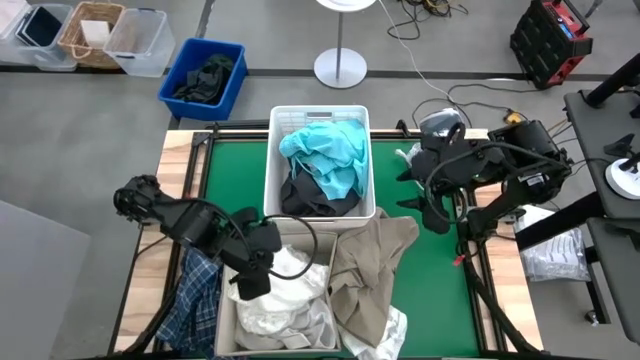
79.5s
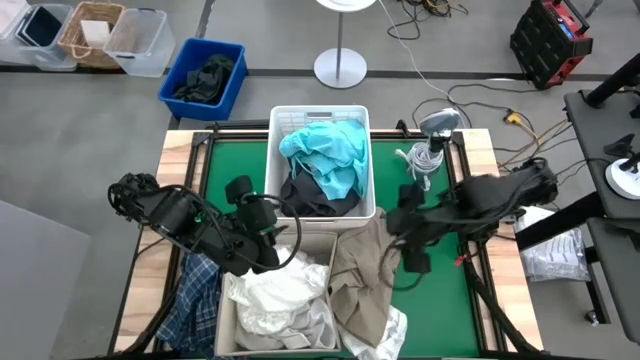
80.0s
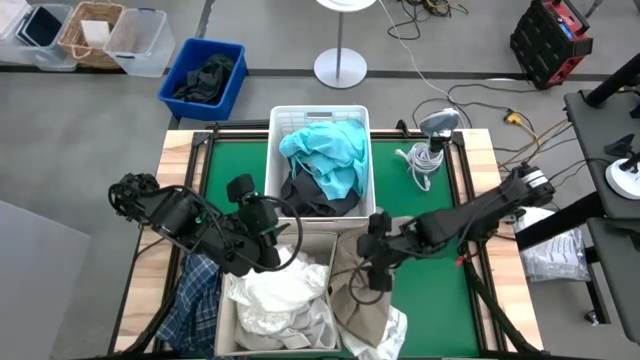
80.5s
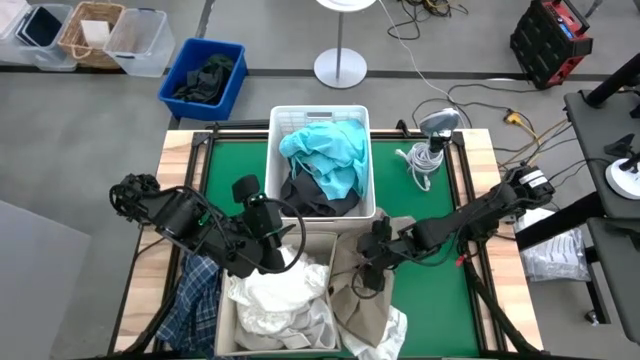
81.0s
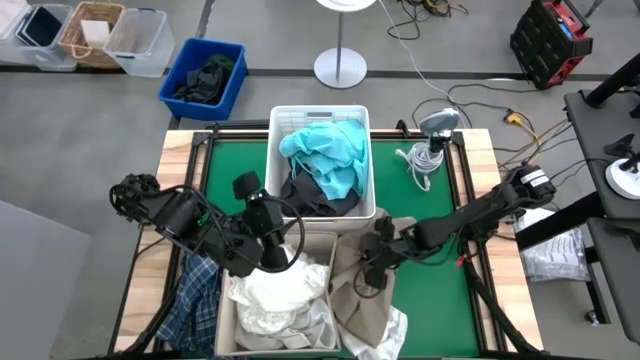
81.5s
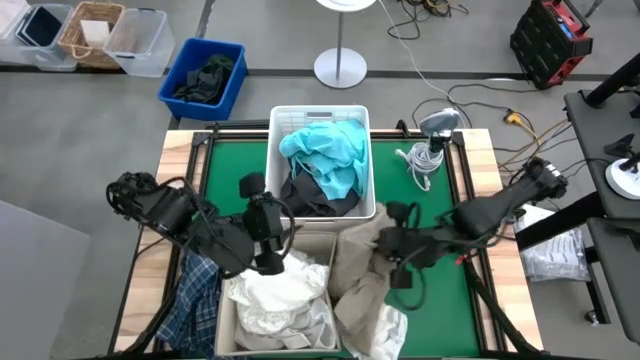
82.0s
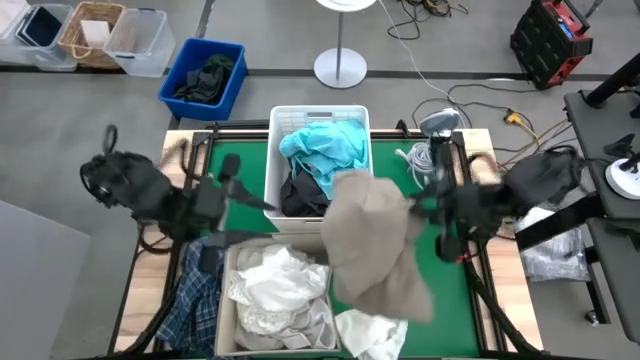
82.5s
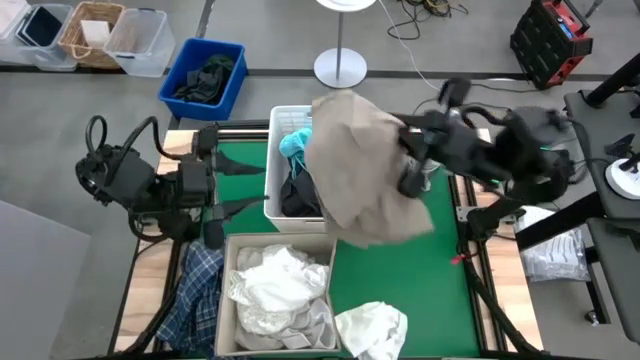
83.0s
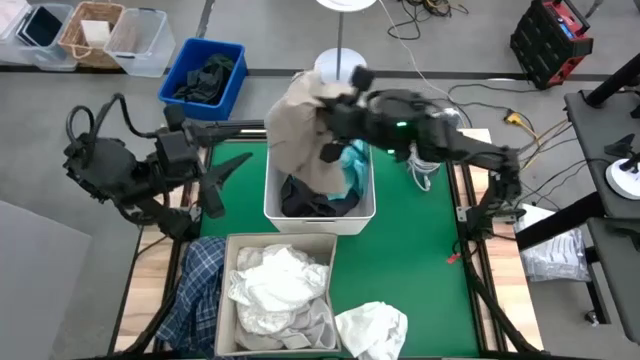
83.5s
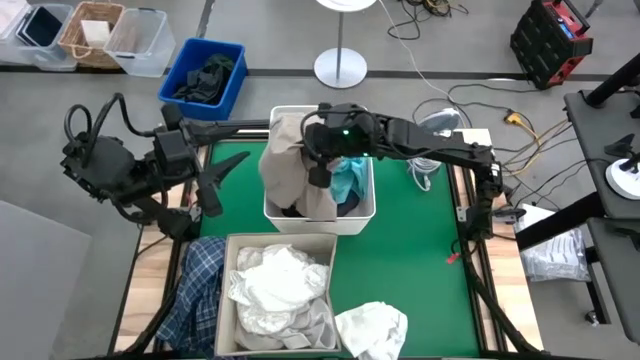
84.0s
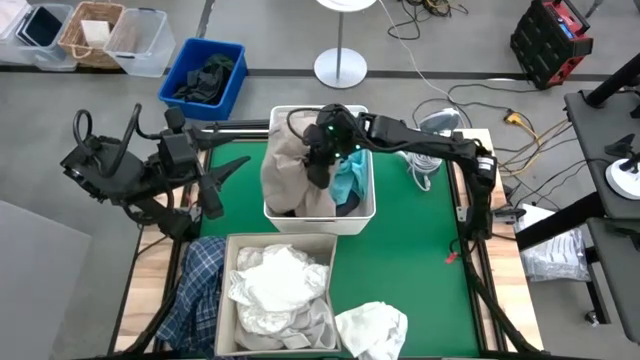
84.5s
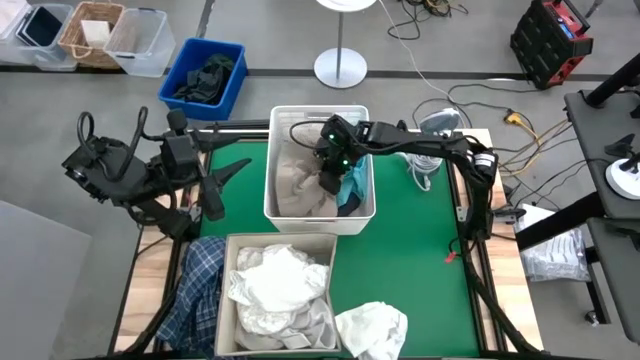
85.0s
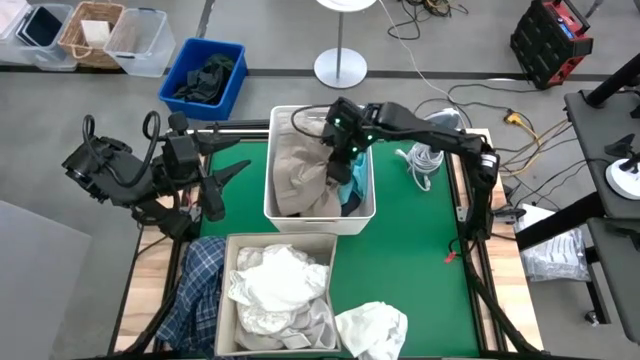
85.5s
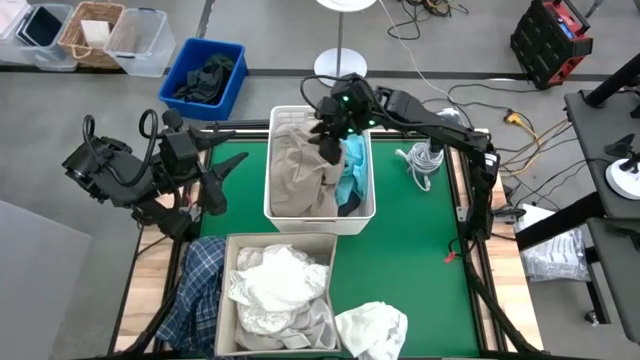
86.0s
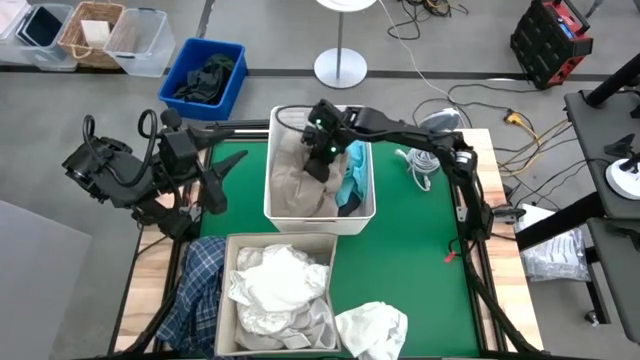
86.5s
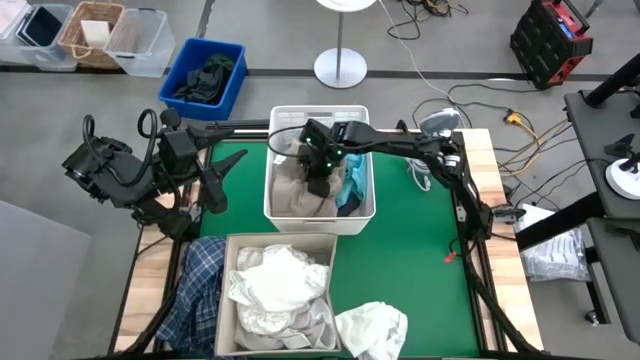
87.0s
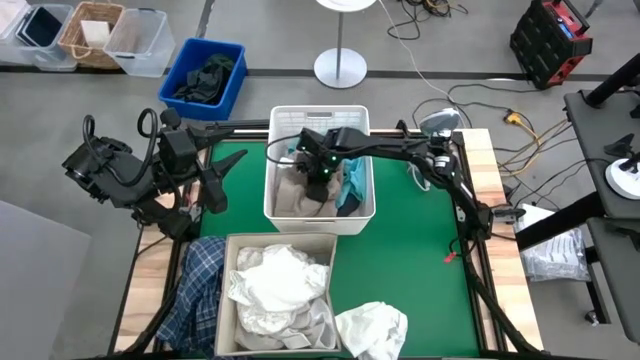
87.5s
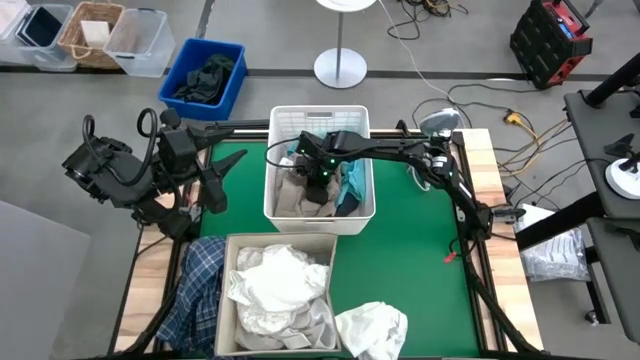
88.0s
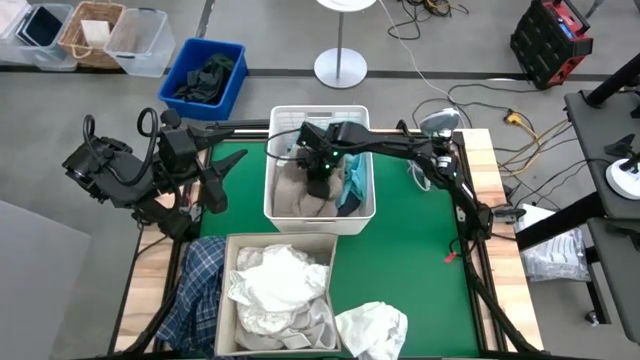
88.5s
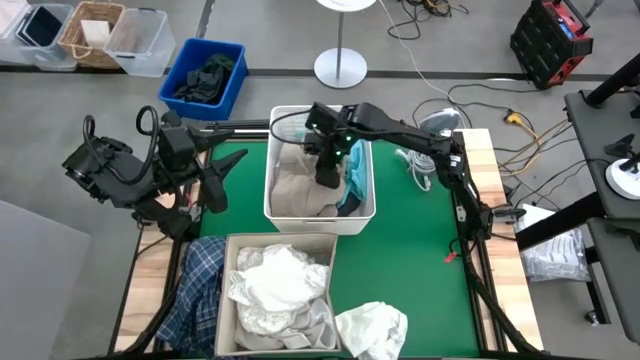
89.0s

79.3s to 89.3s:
Task: Sort clothes
Put the brown short pants into the white bin

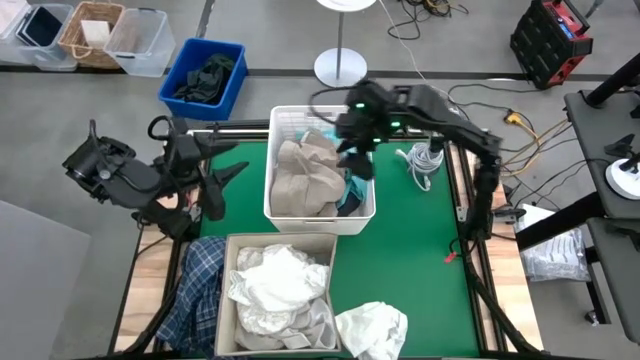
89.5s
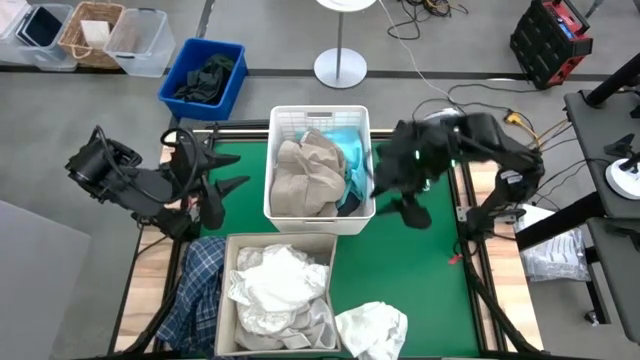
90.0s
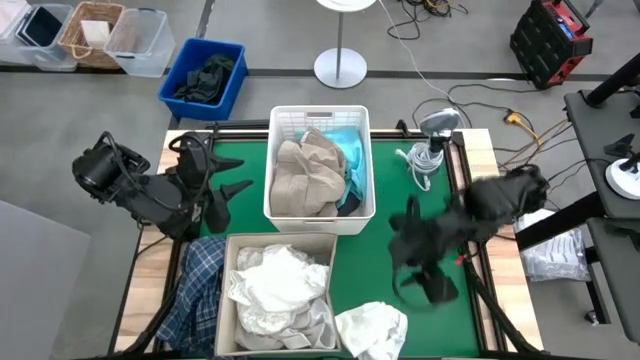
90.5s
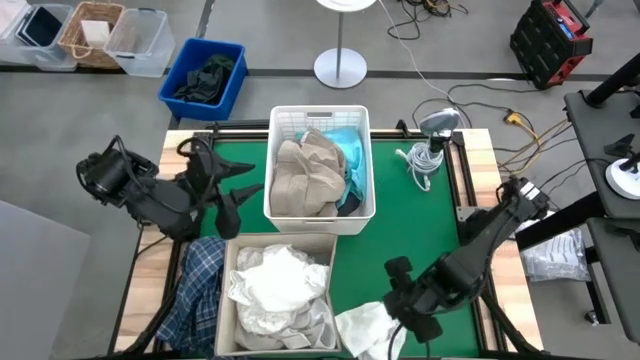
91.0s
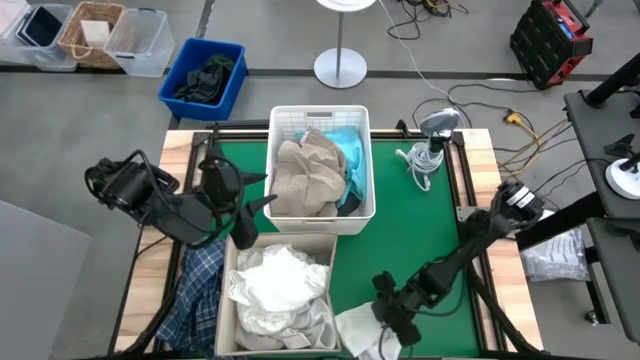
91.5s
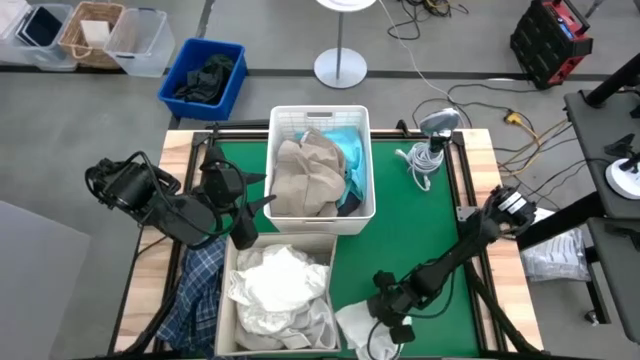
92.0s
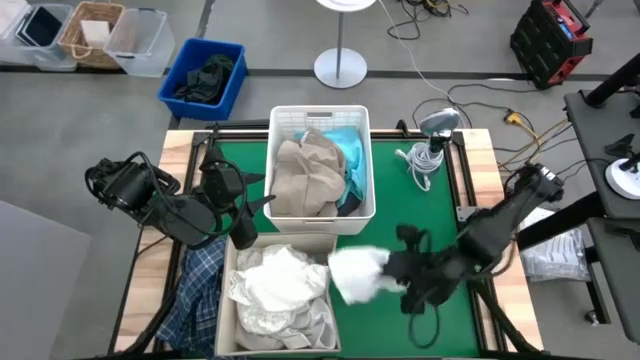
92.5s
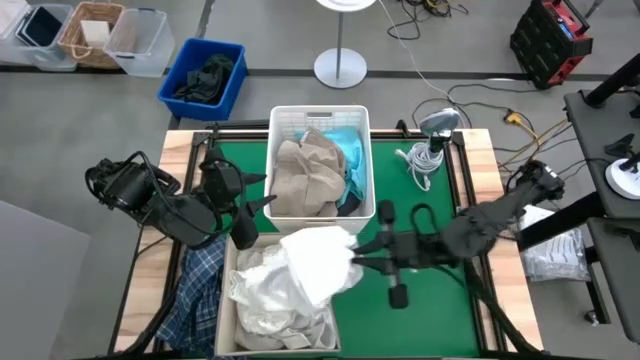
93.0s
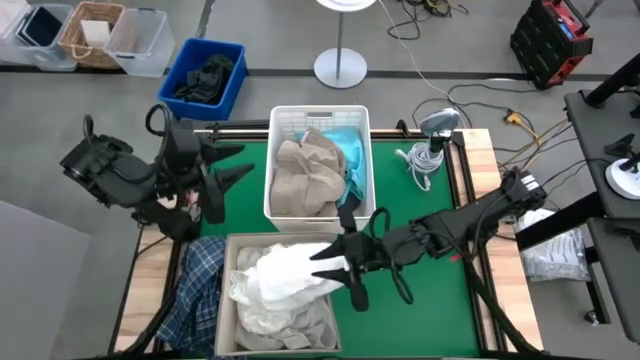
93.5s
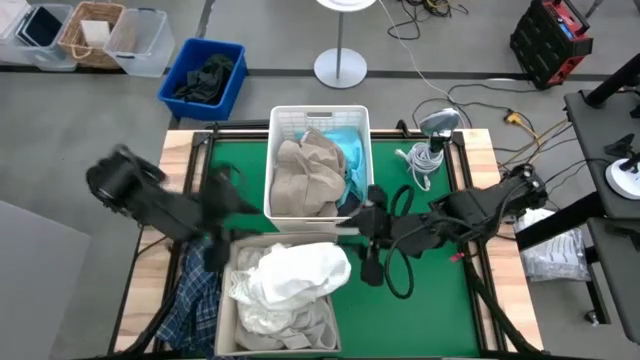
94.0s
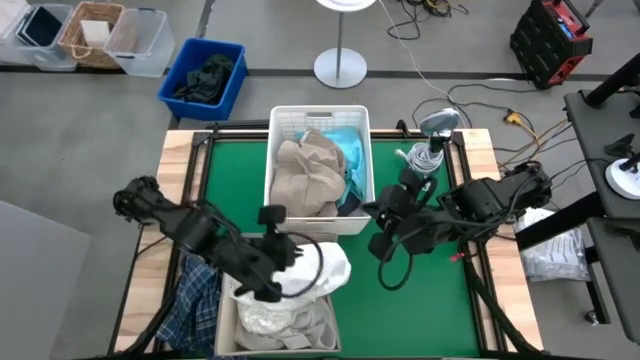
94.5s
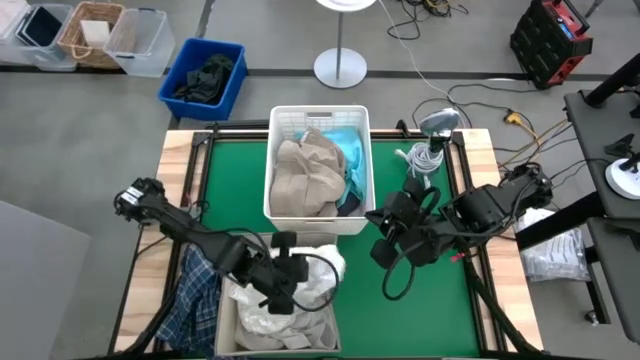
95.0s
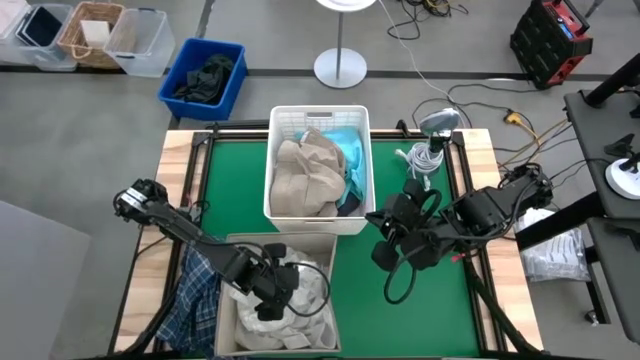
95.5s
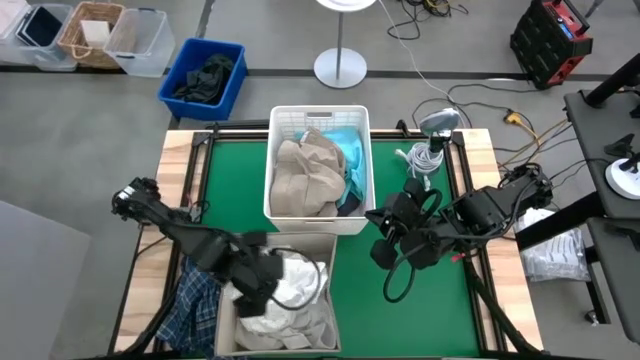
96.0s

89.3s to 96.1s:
Put the white short into the laundry organizer

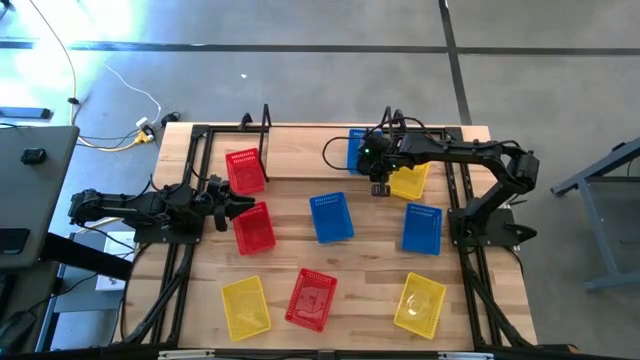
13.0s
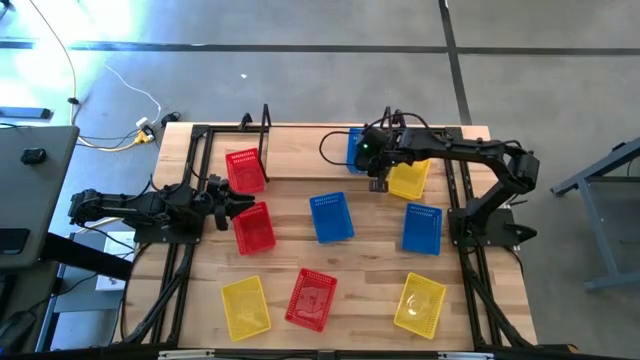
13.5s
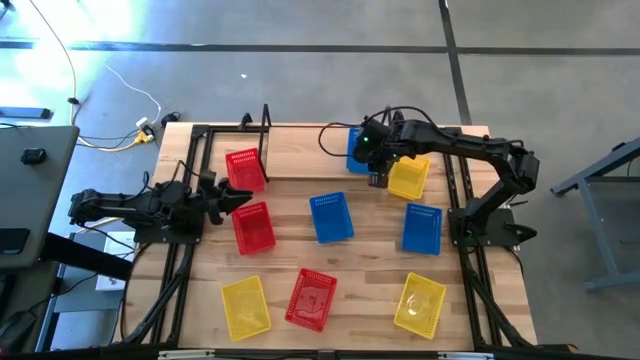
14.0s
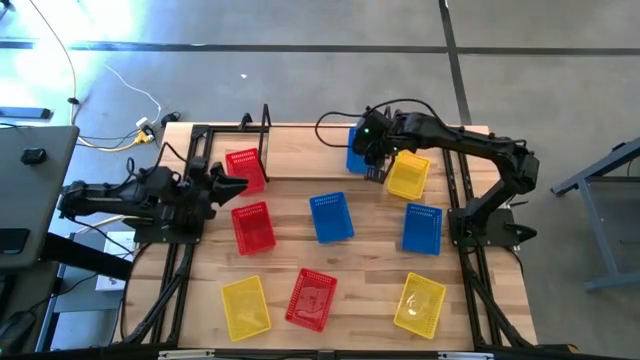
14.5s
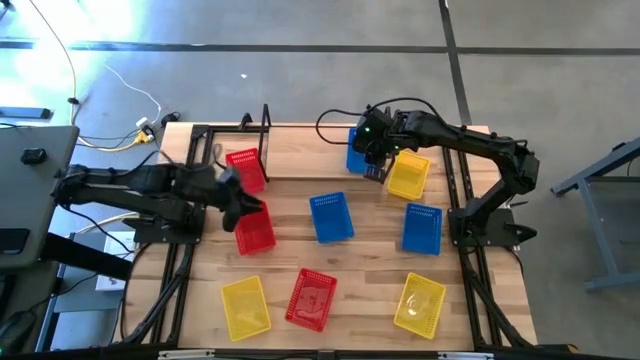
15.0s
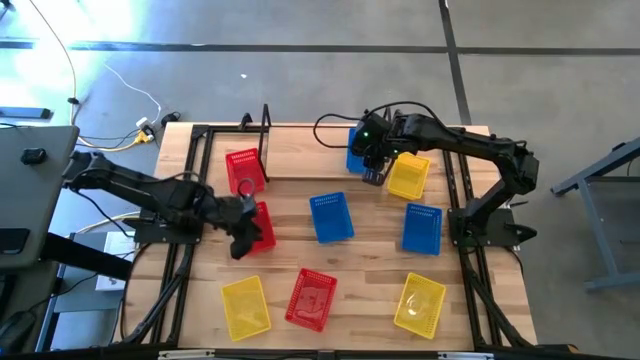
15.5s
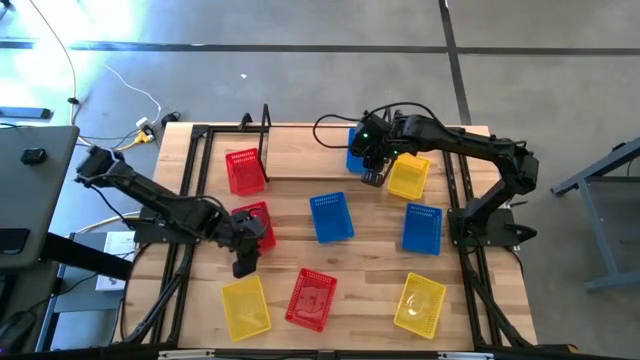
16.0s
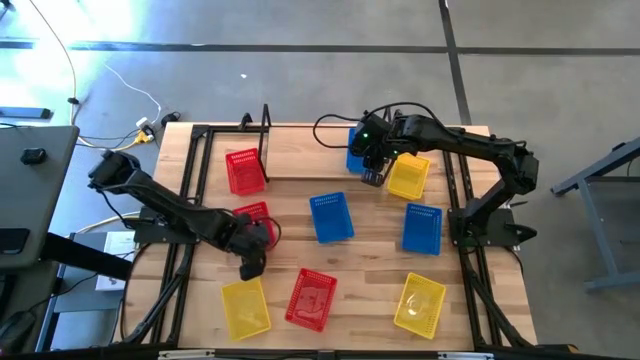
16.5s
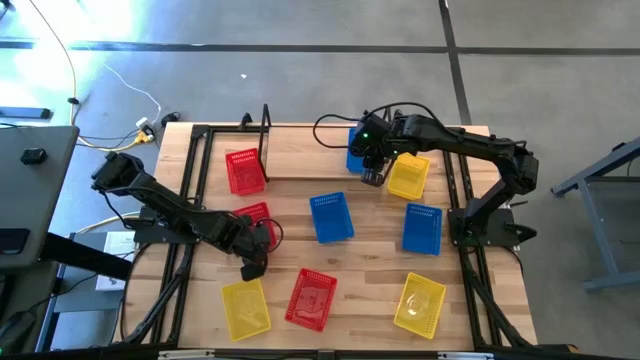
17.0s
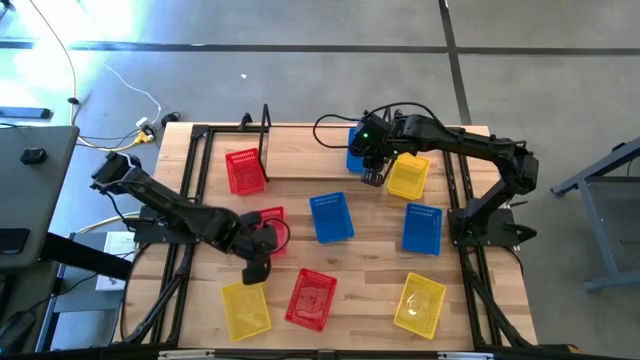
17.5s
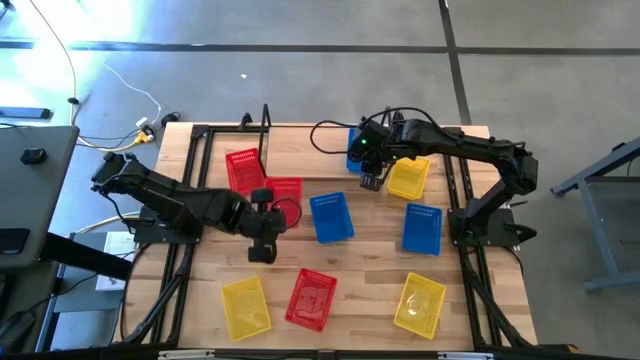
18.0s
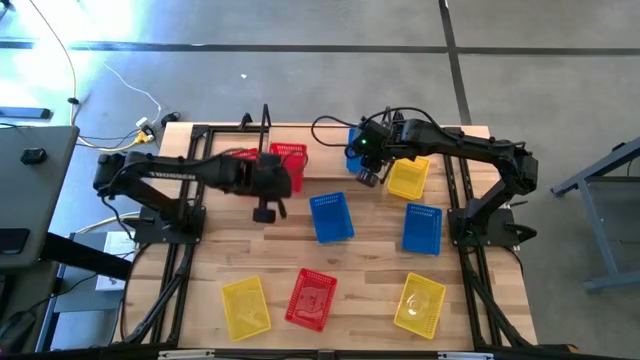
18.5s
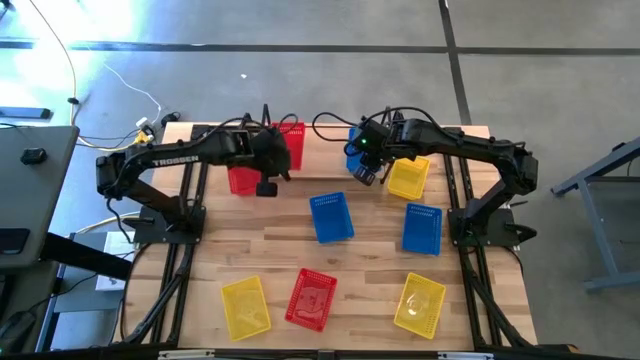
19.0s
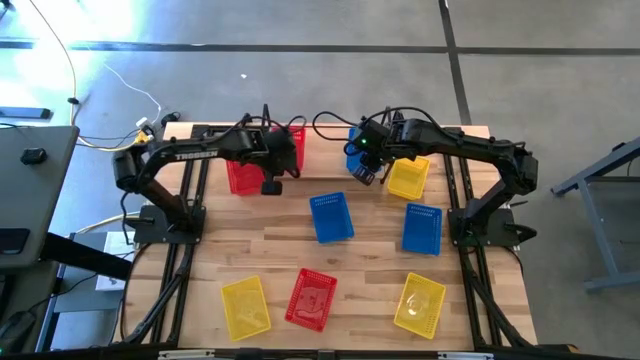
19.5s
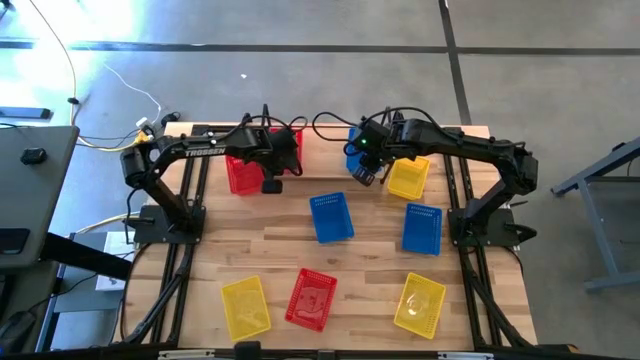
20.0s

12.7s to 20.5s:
Task: Stack baskets on shelf by color
Put the middle left red bin on the shelf
